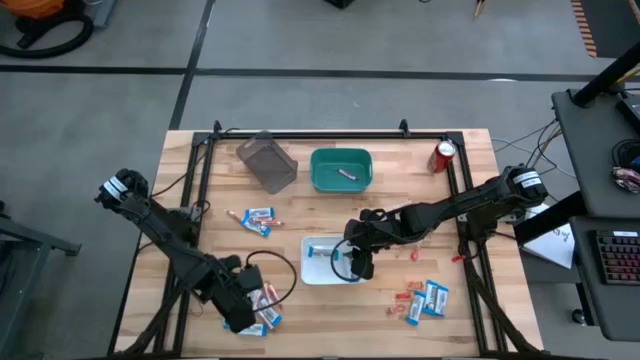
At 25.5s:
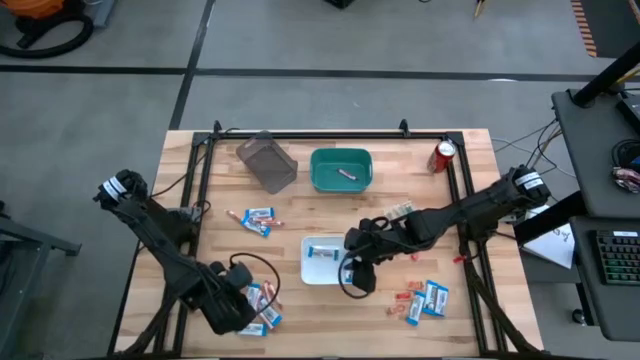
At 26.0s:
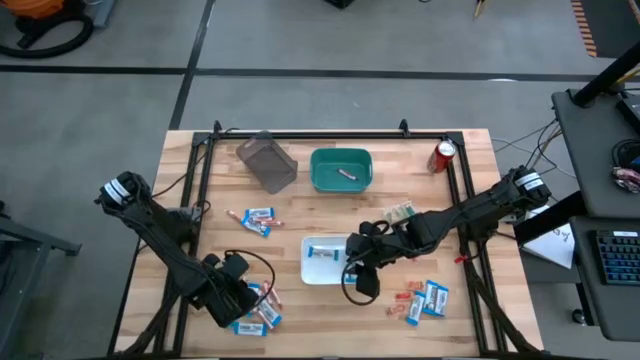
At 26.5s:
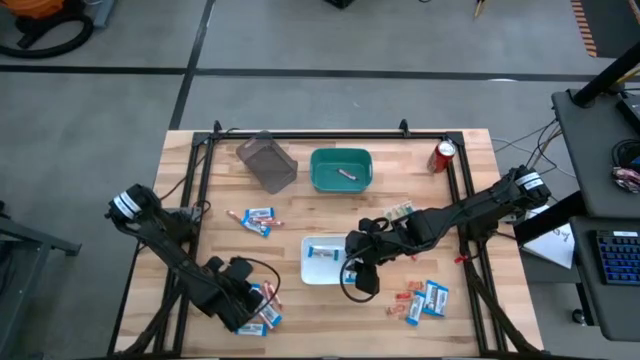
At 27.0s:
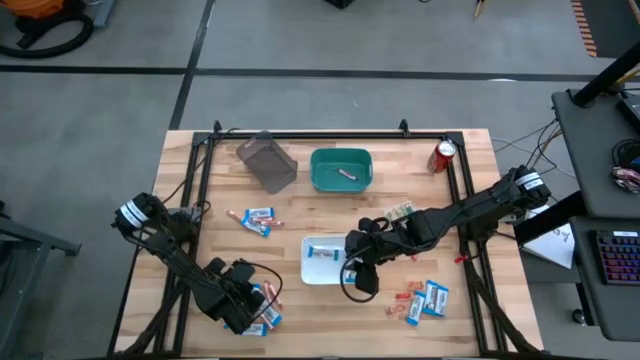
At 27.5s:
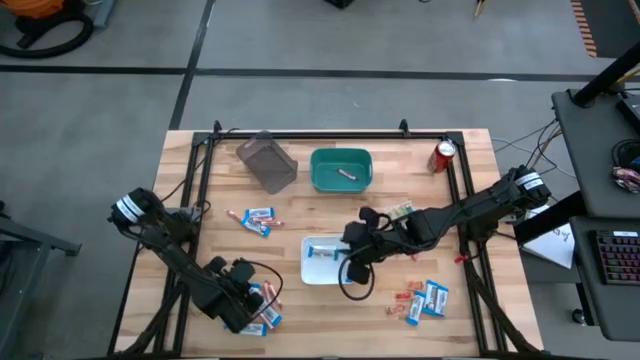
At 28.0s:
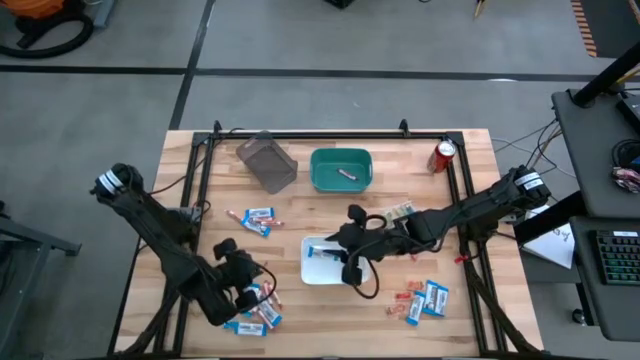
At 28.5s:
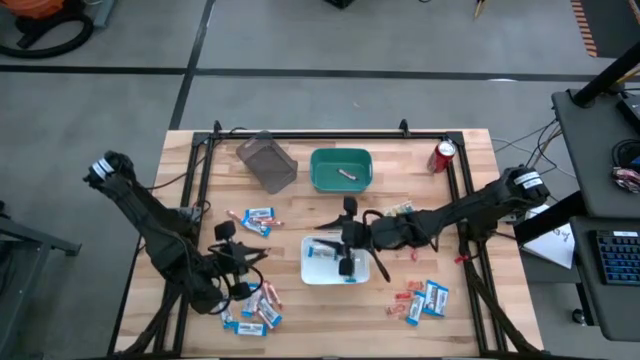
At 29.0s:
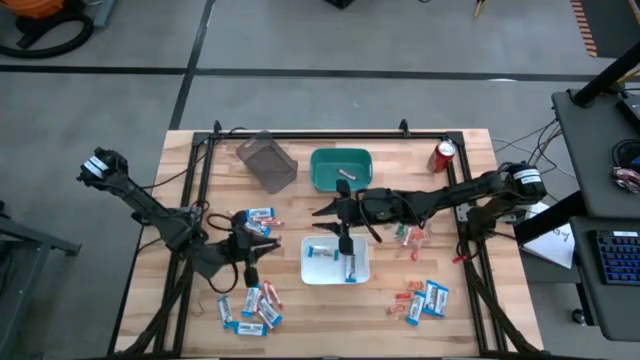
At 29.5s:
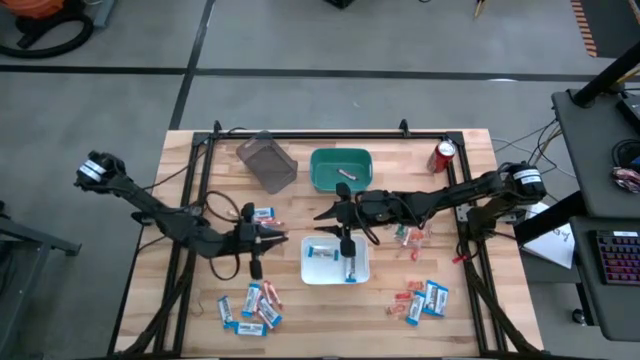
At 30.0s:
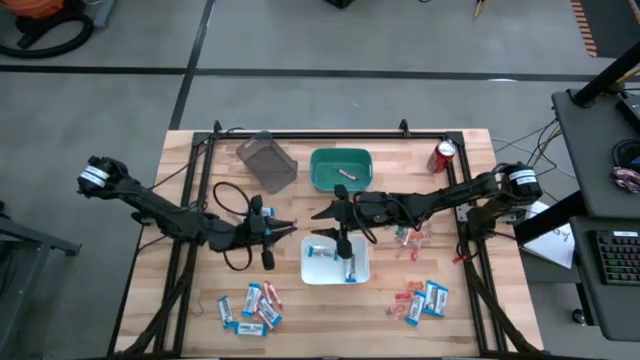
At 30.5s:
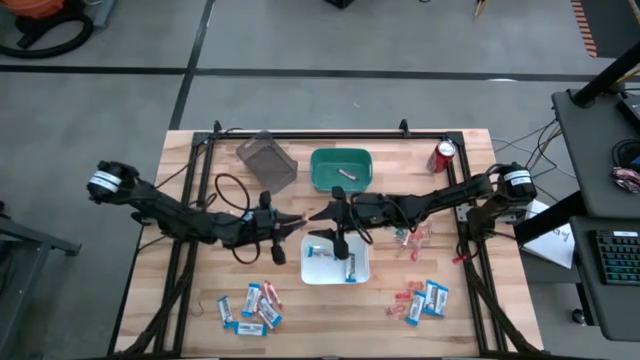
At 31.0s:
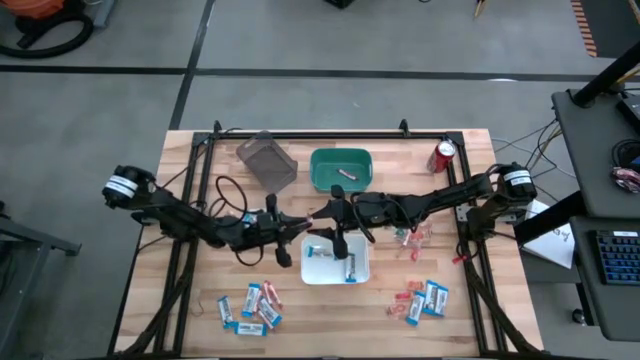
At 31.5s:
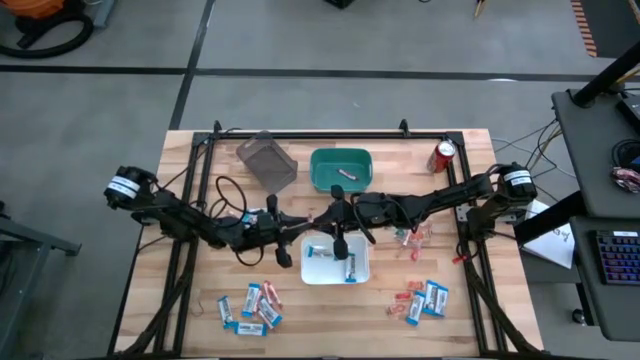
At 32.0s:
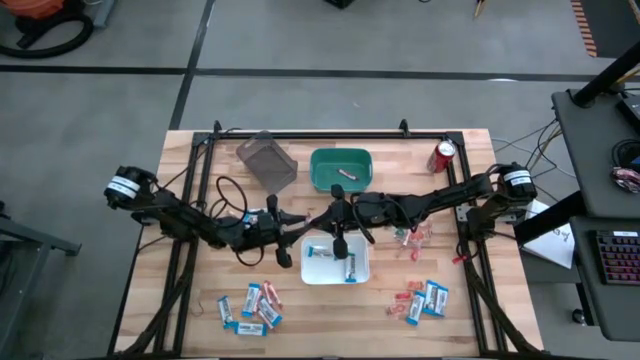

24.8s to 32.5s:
Task: Sort candy
Put the white candy into the green bin

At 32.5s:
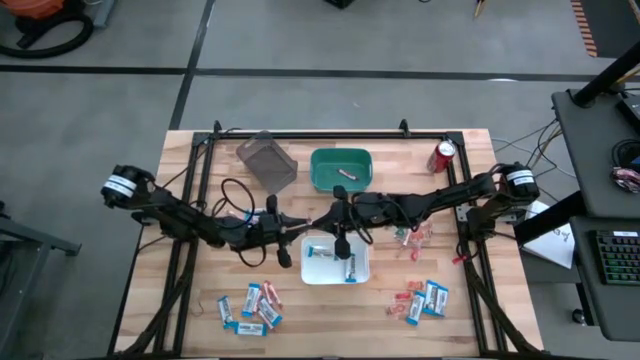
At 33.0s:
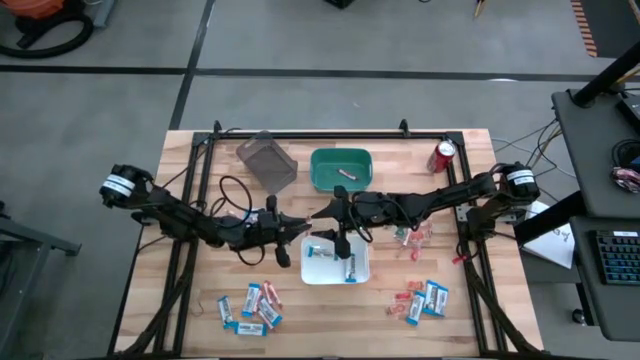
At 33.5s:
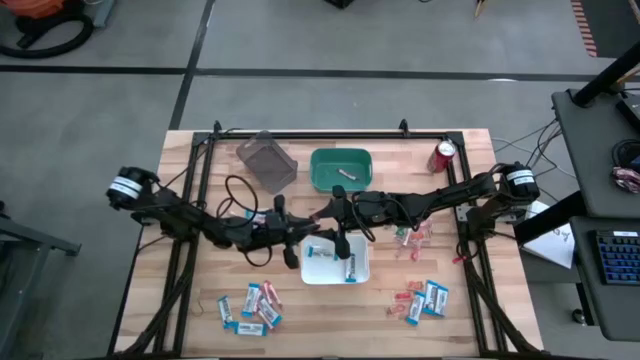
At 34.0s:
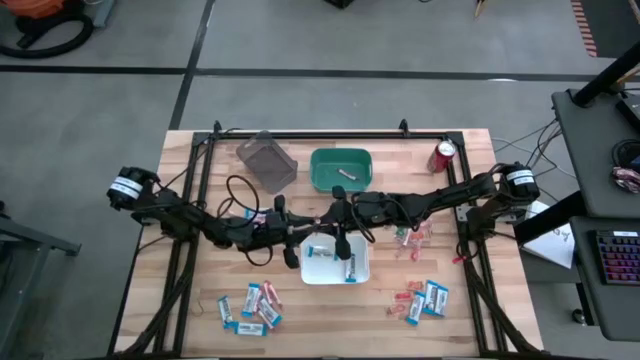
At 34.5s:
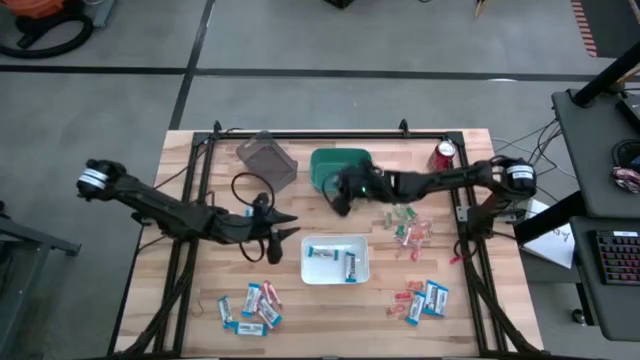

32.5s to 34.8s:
Put the white candy into the green bin

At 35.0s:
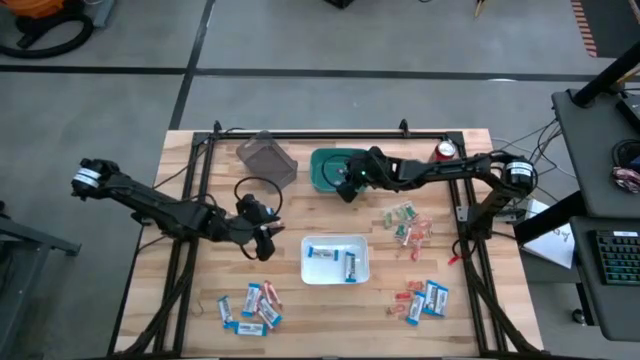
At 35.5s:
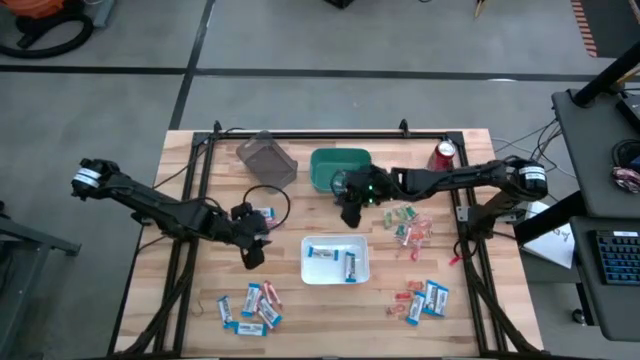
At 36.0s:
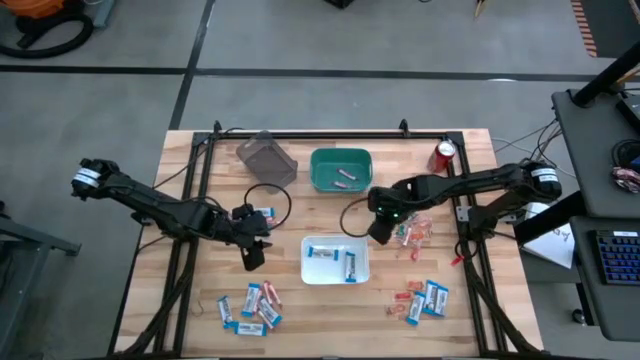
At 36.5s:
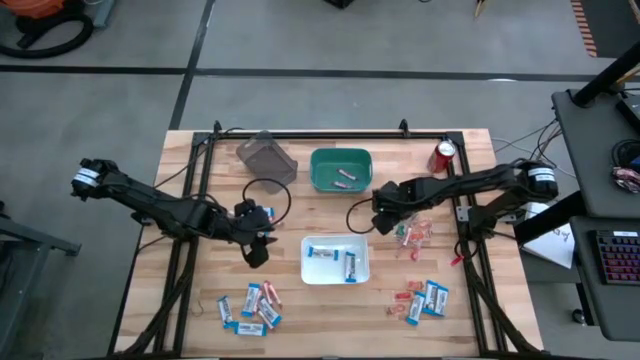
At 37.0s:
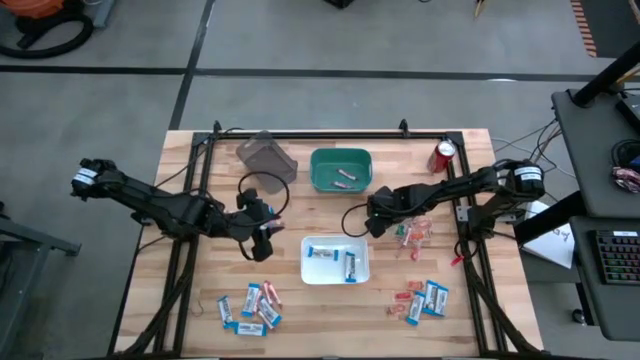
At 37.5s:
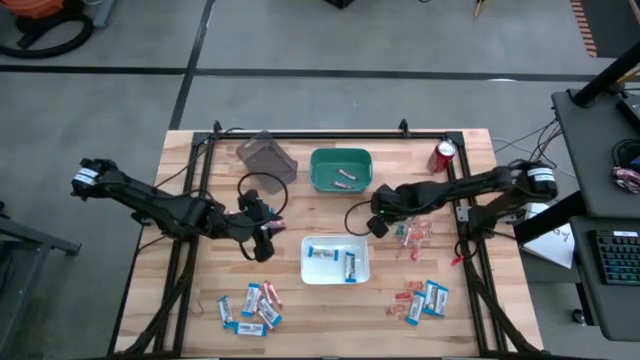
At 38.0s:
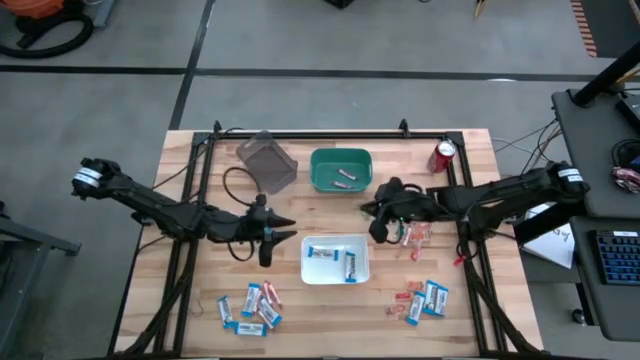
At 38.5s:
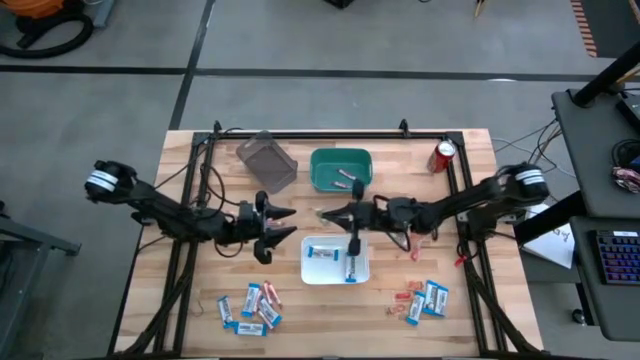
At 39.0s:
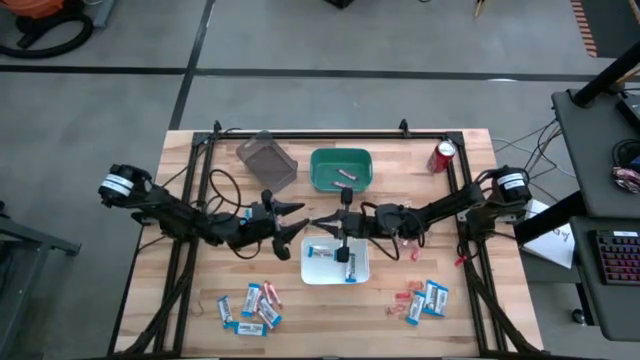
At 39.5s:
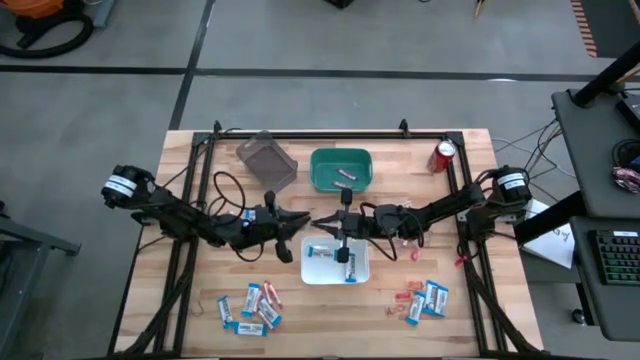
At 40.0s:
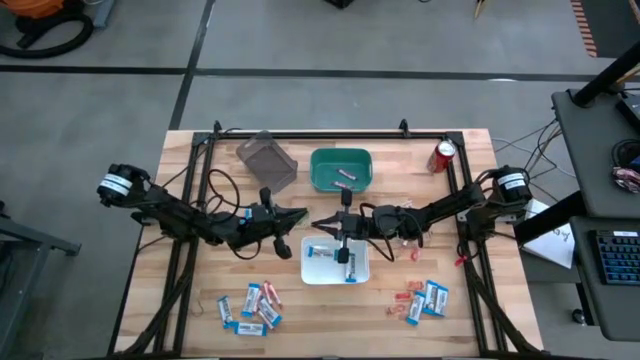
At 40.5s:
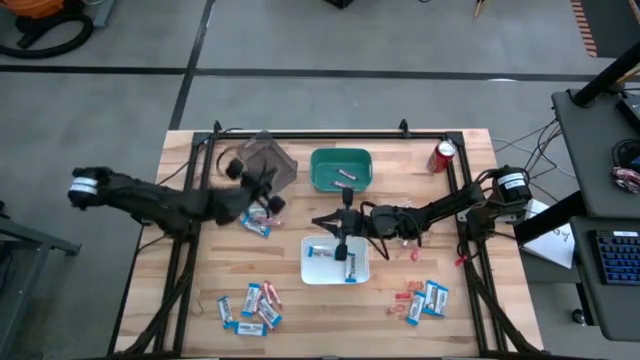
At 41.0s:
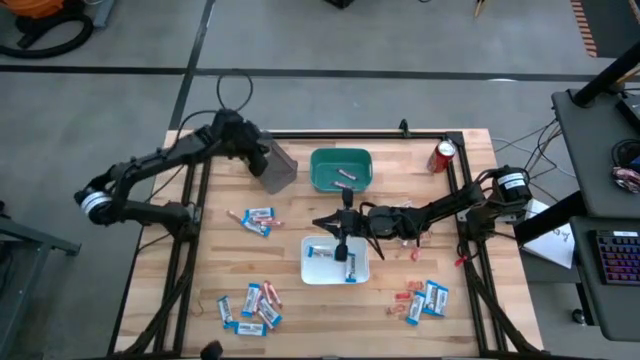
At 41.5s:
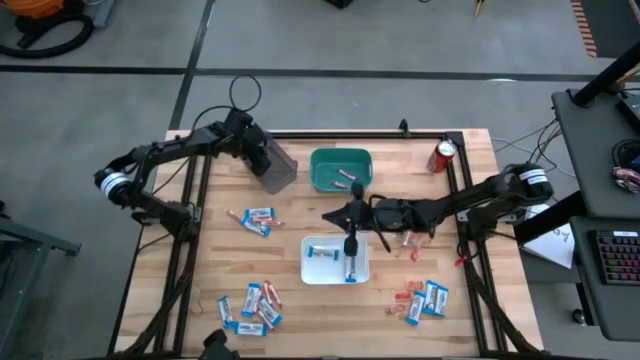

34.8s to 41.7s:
Put the green gummy into the black bin

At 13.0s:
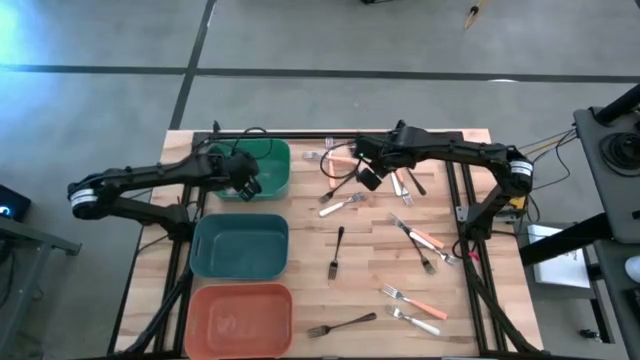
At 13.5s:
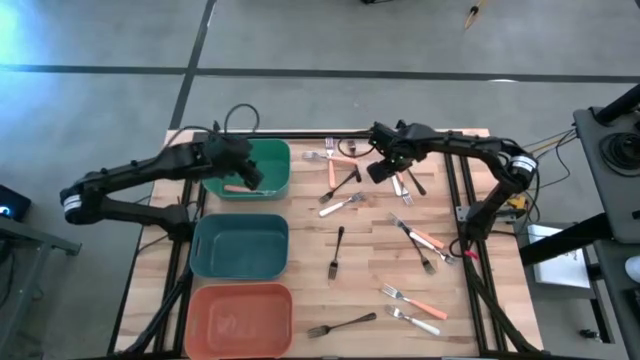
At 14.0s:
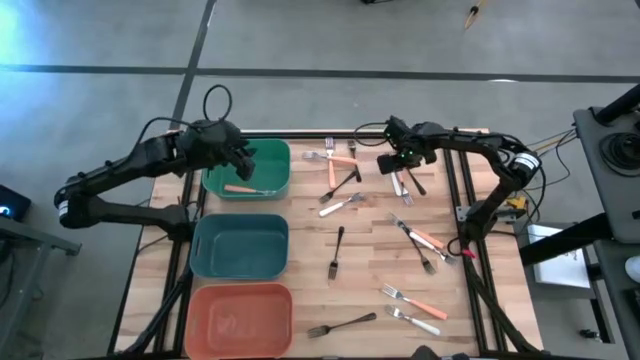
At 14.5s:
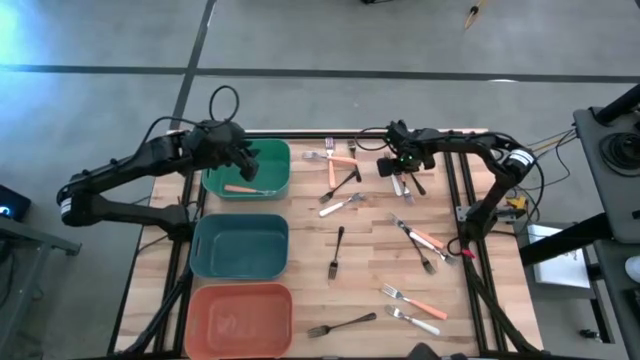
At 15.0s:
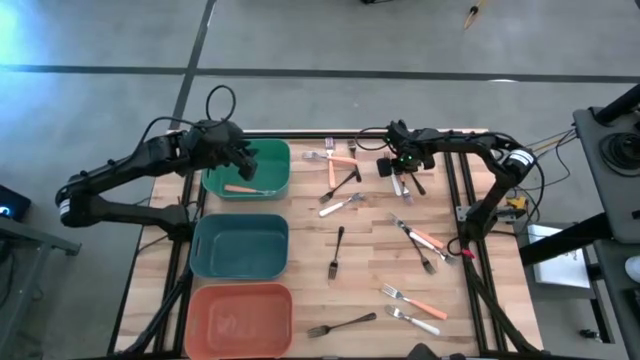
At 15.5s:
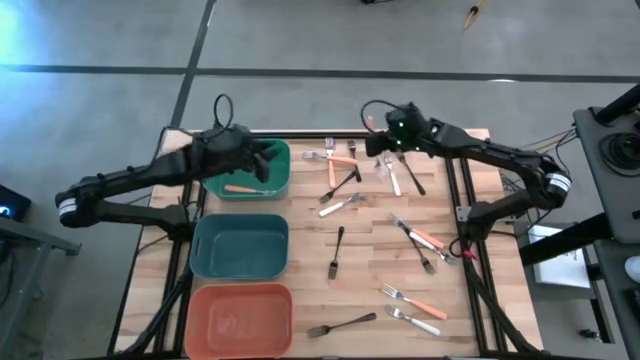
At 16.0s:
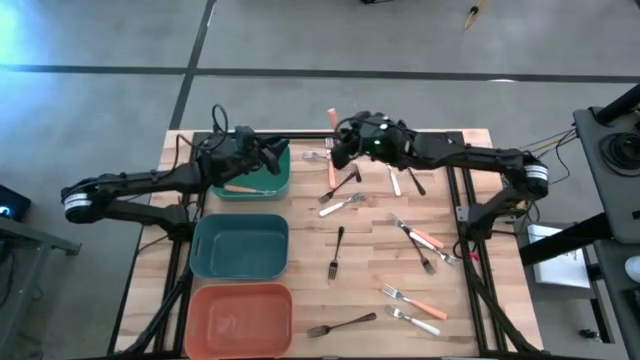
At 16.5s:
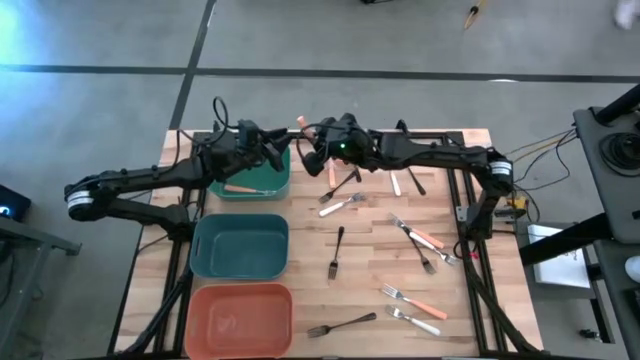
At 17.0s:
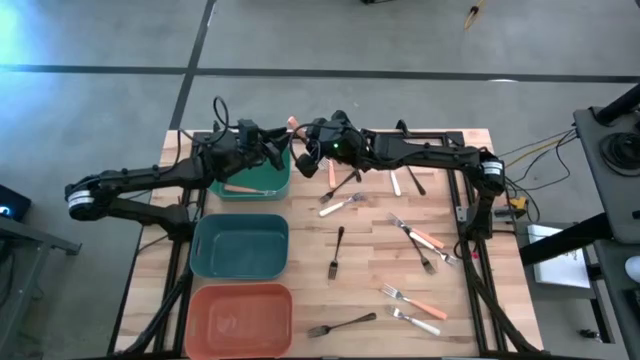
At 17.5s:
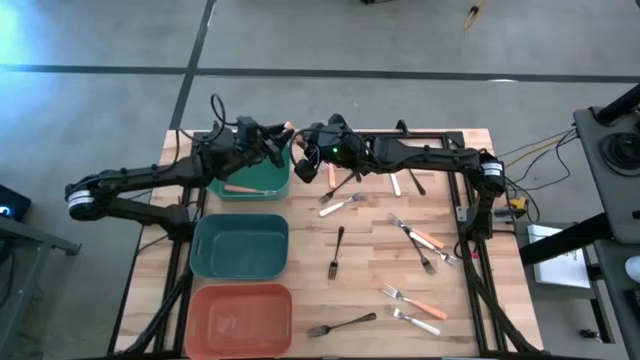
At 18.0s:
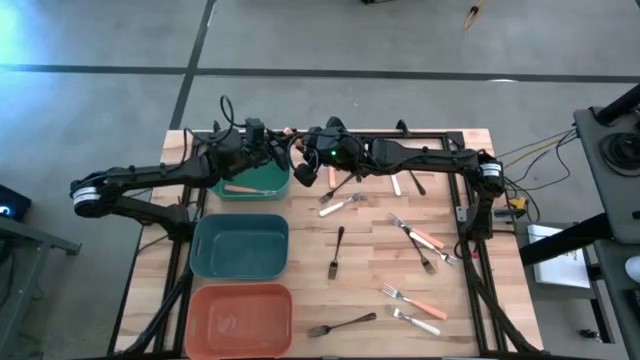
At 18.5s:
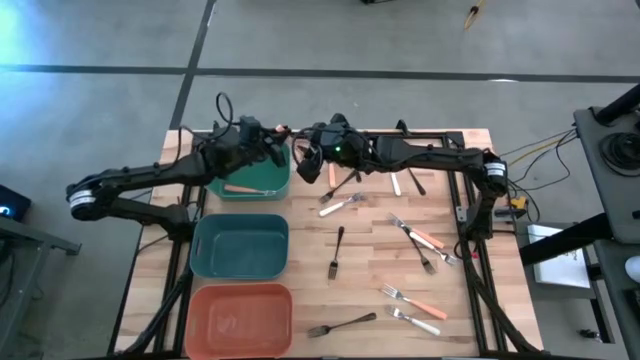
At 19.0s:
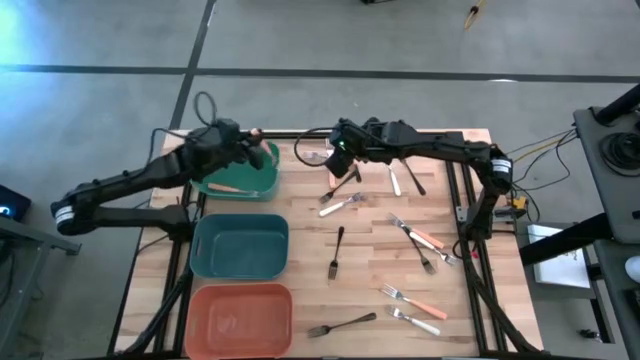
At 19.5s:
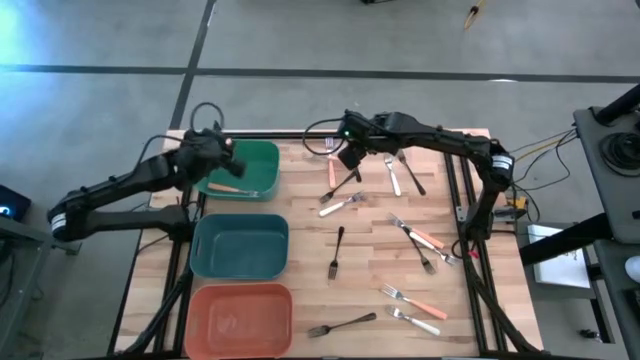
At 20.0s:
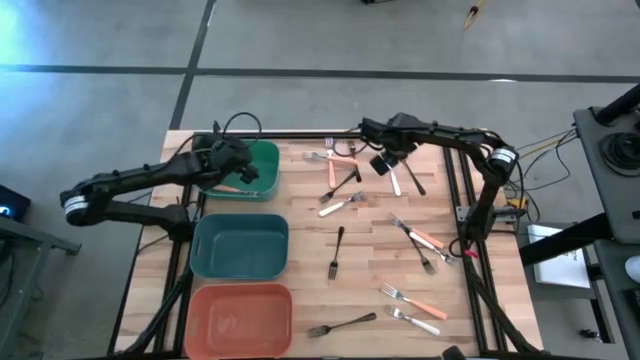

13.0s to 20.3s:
Task: Sort silverware by color (type)
Put the orange fork into the green bin
